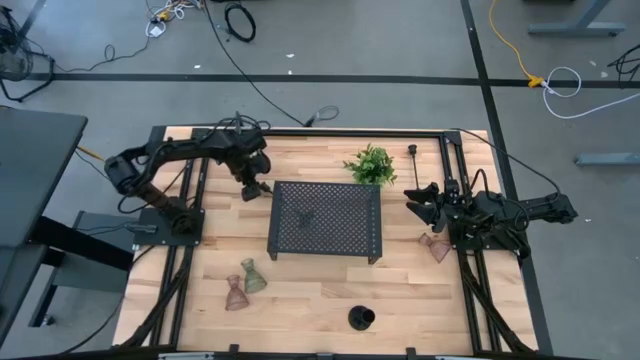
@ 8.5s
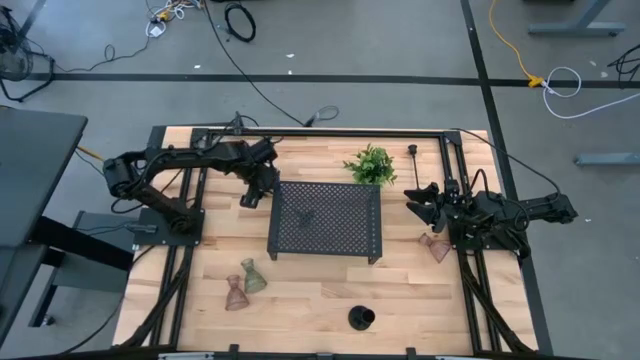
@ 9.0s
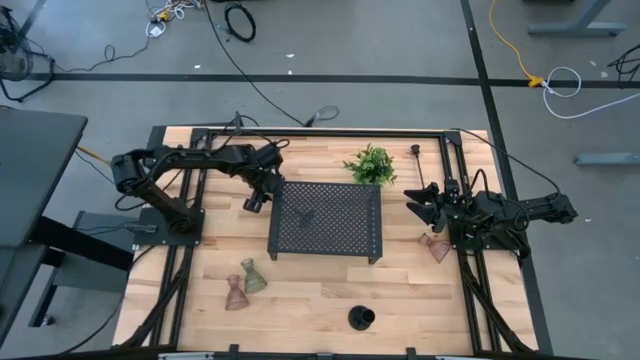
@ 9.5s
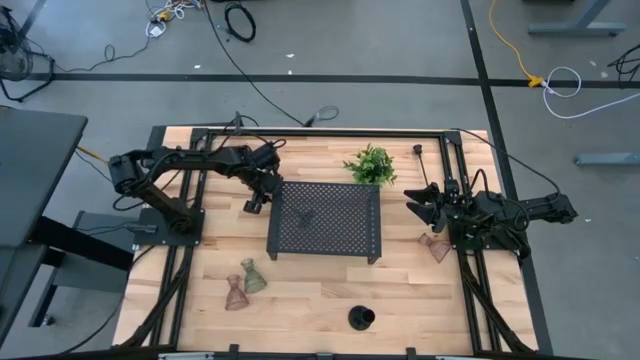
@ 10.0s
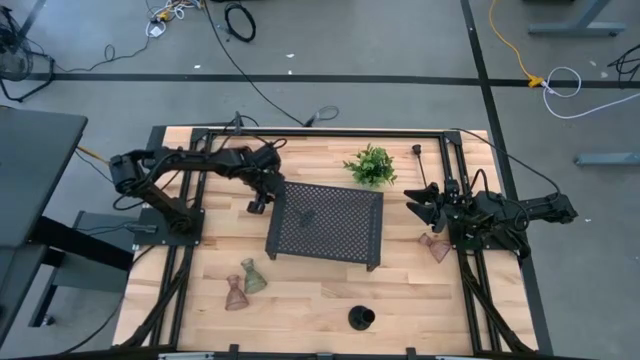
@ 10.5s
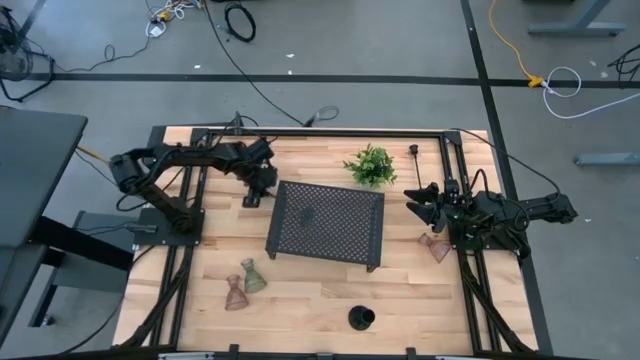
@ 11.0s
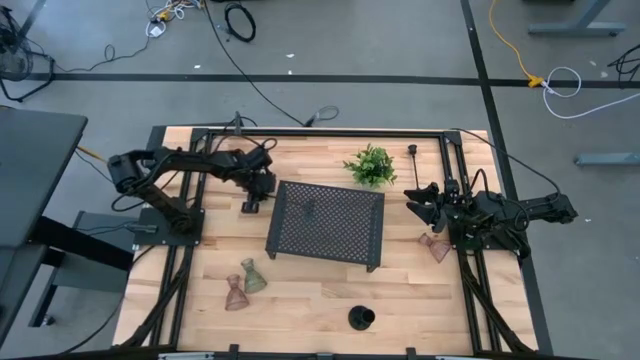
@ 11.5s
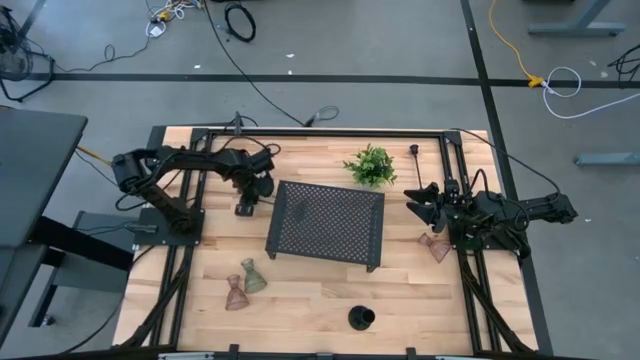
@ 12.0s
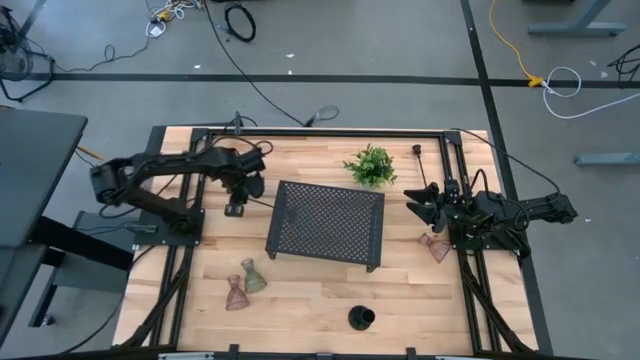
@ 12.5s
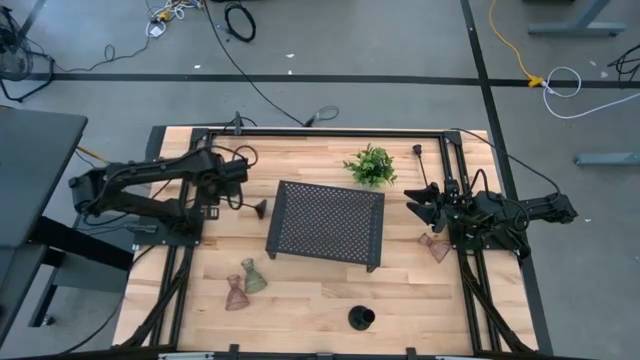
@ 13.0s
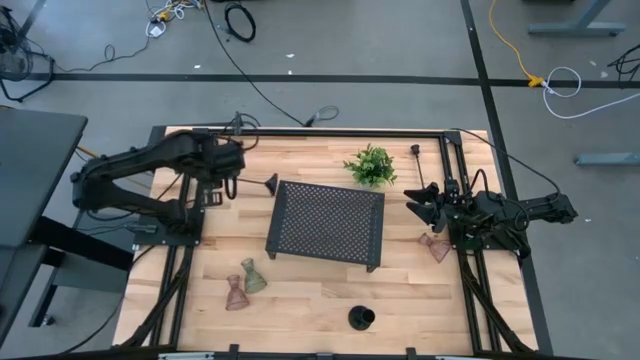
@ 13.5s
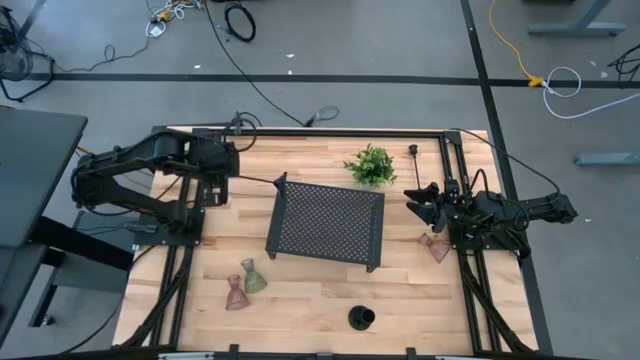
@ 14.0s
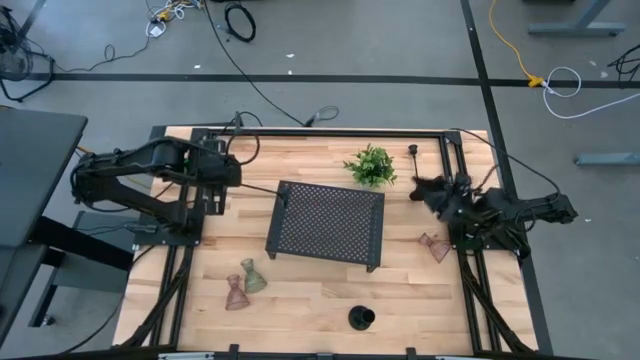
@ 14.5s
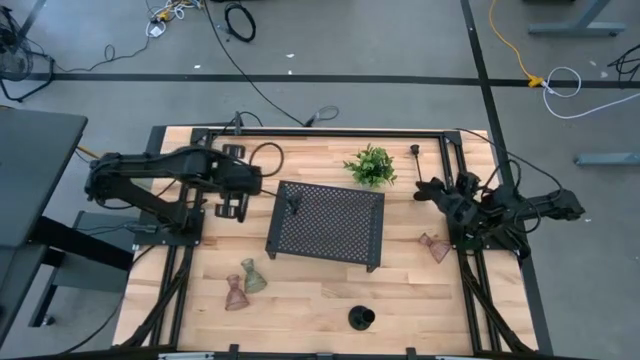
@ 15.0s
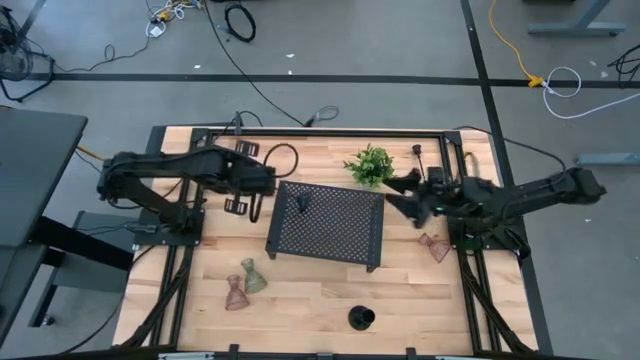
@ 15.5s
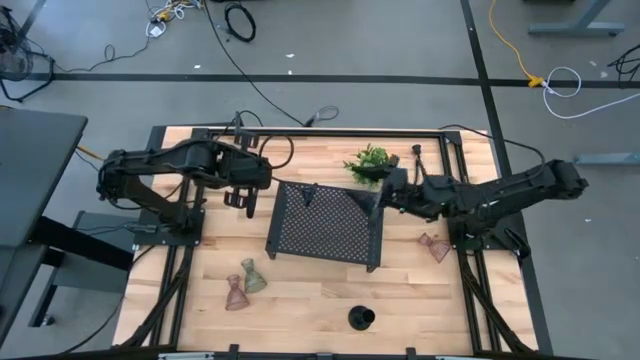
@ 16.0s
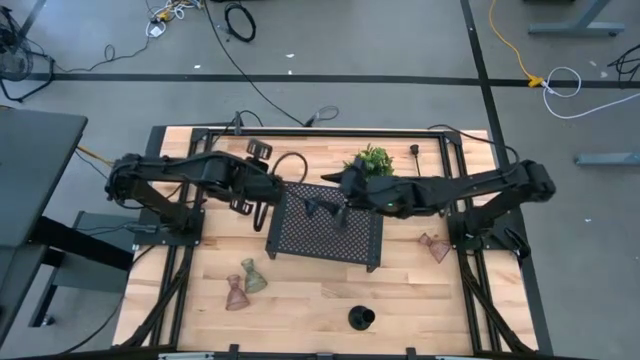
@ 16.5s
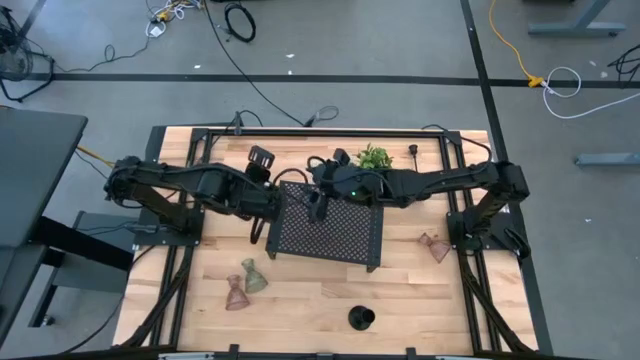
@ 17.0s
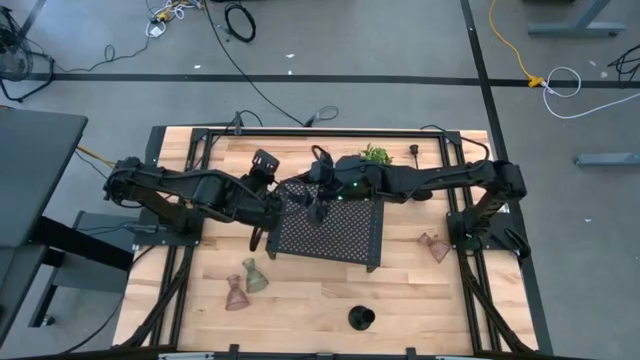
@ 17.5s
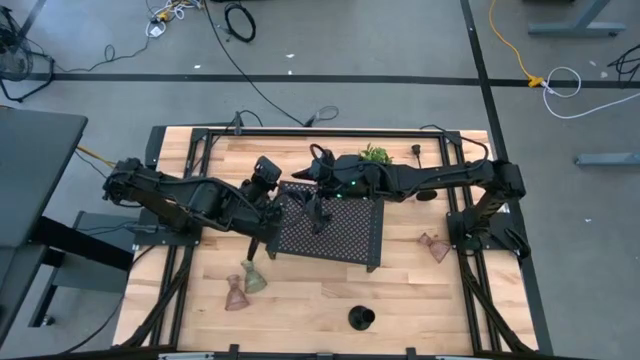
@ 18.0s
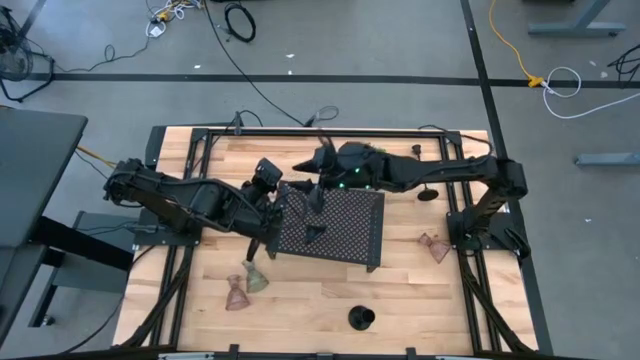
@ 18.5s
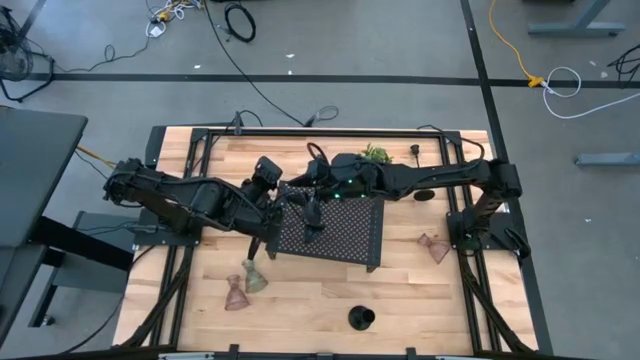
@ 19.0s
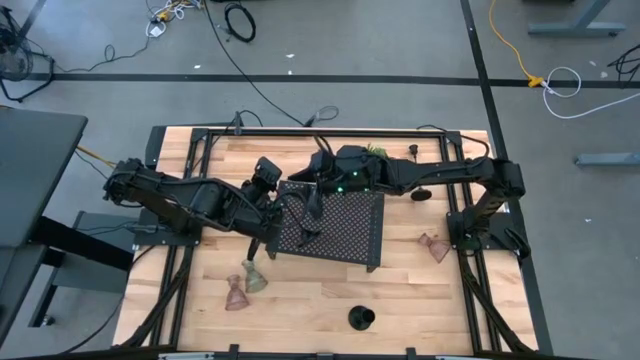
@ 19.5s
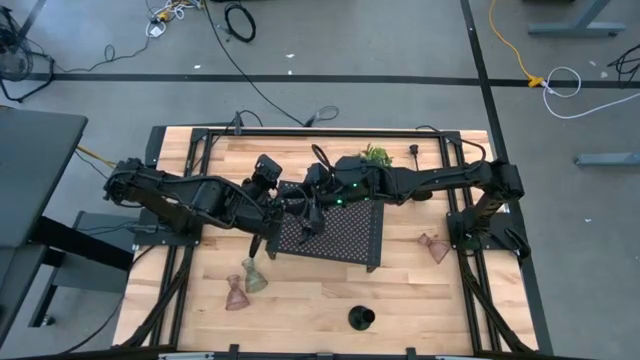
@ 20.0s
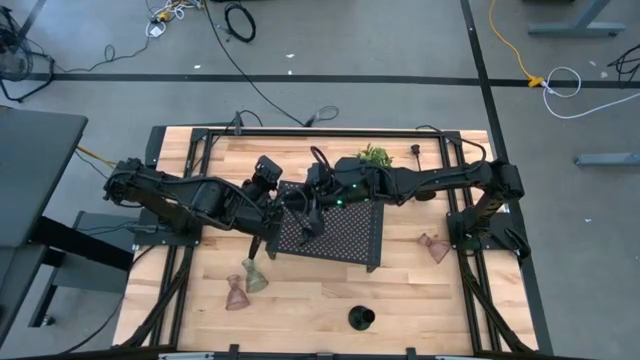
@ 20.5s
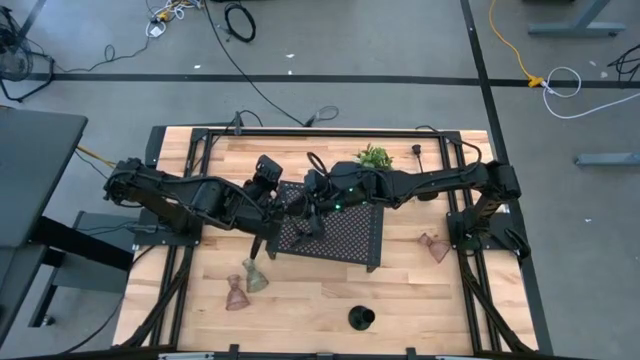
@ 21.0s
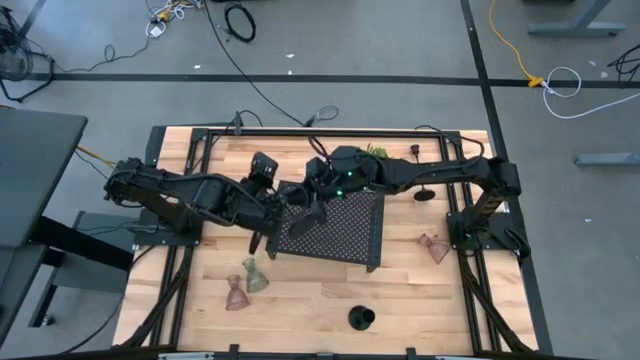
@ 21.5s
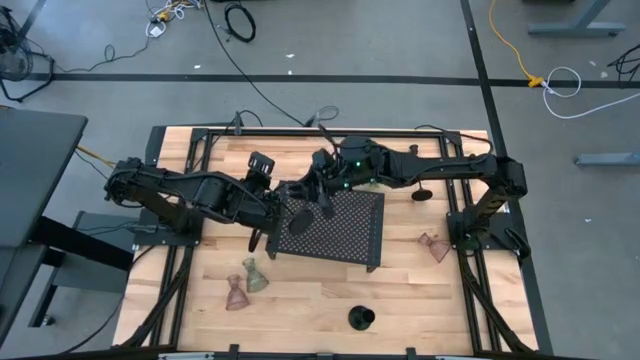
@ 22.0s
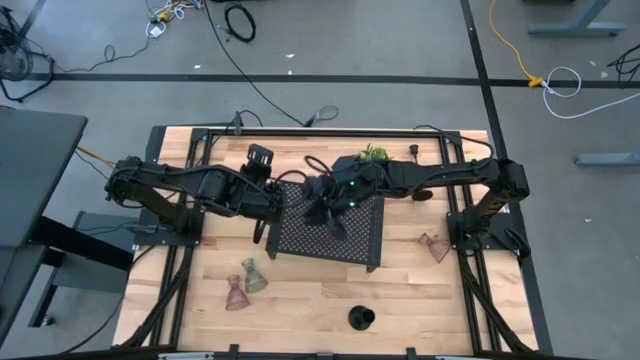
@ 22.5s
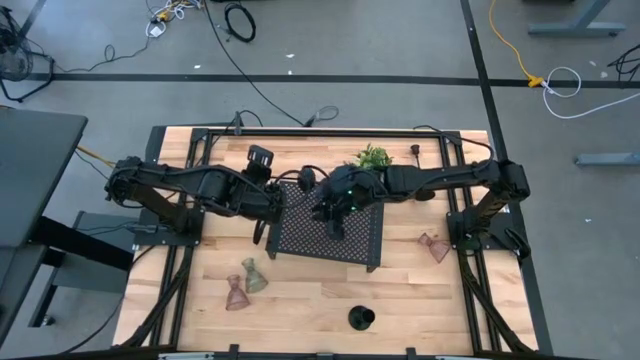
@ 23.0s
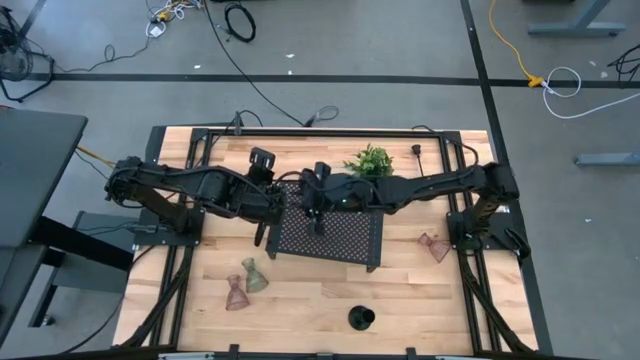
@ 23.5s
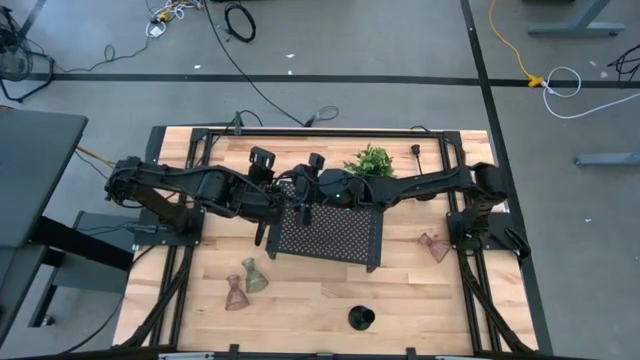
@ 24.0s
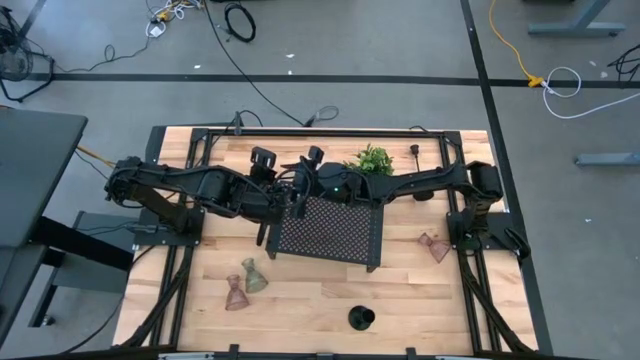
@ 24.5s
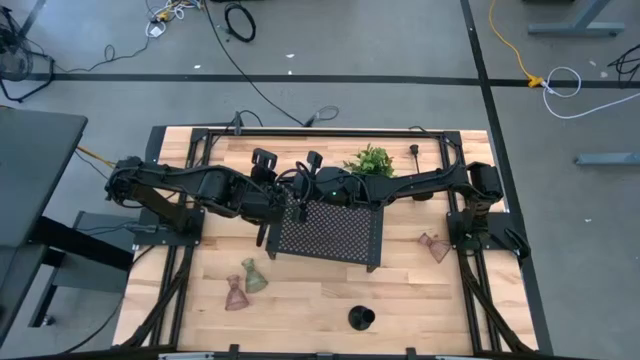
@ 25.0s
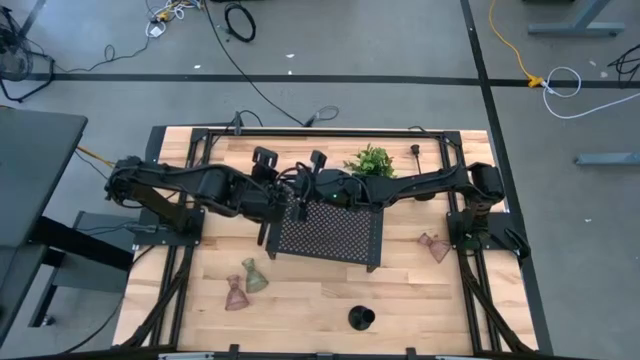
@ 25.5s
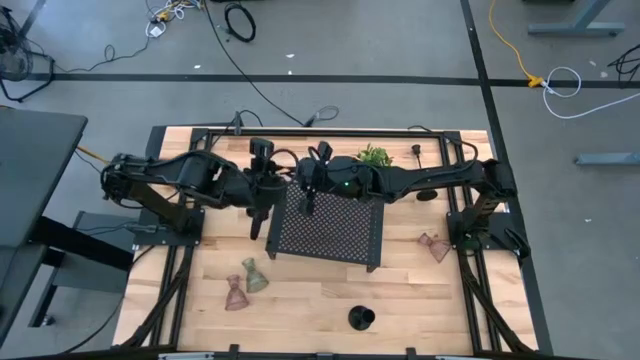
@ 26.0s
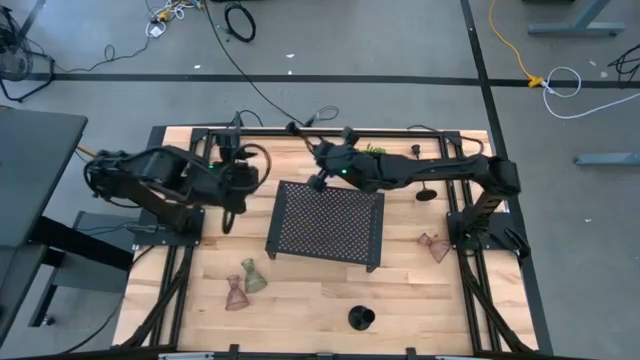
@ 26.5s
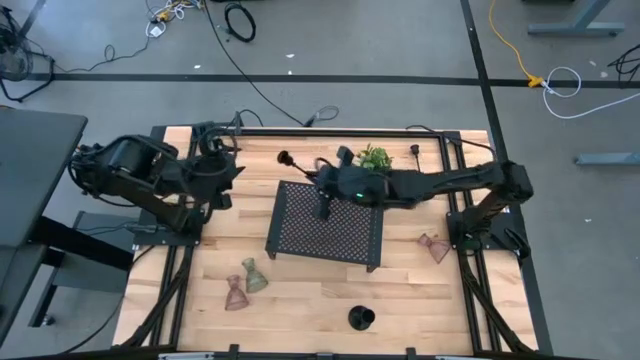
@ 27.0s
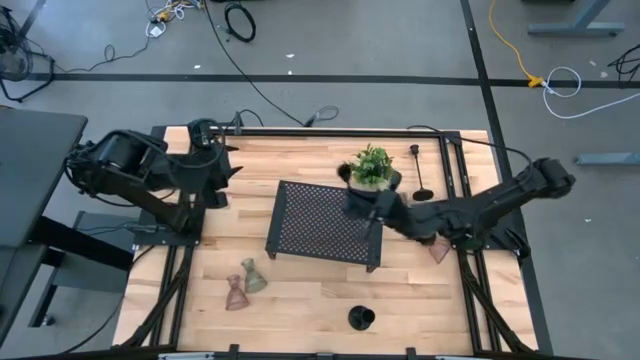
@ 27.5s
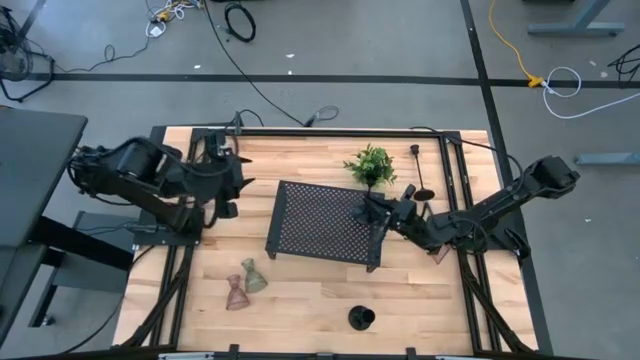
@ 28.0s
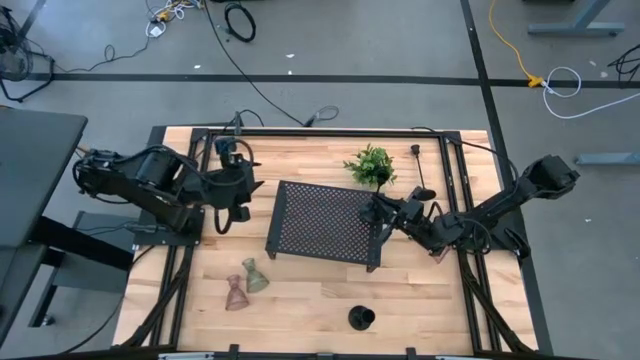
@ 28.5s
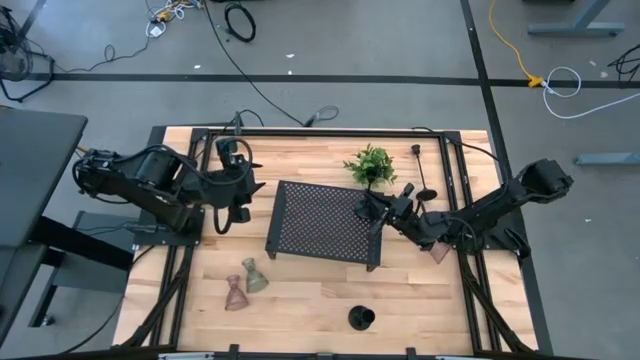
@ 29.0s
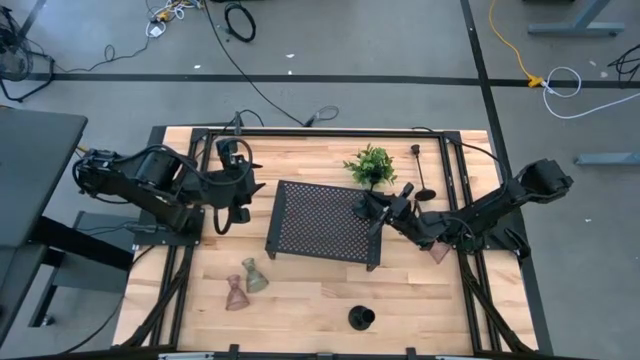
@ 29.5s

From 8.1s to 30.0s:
Task: Pick & Place candle stick holders
Put the left black metal candle holder on the shelf
